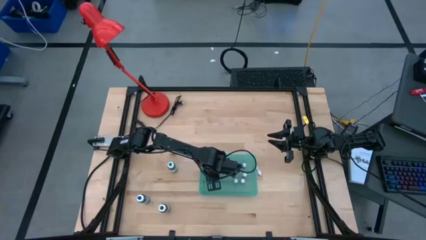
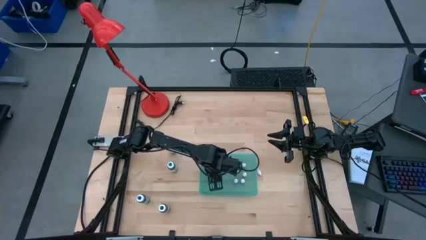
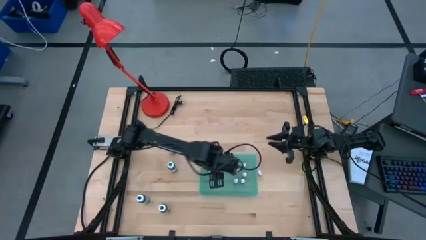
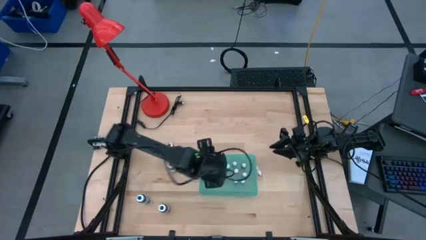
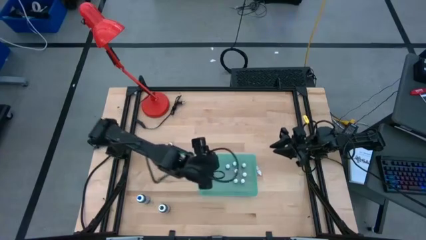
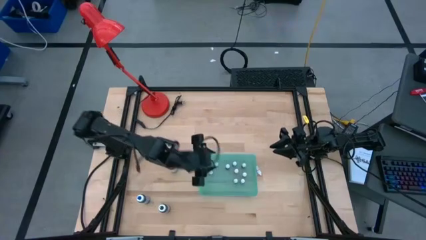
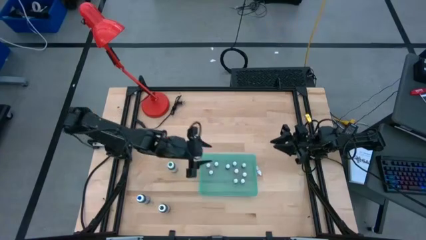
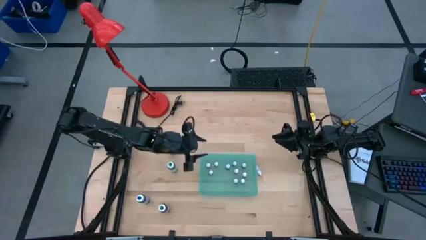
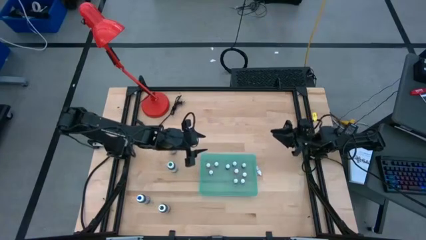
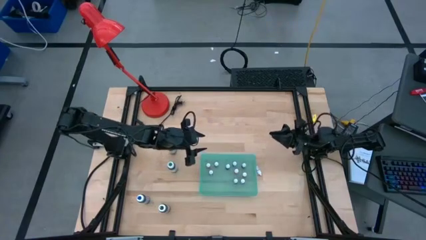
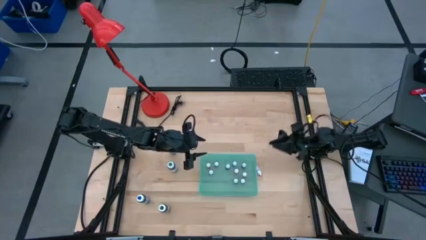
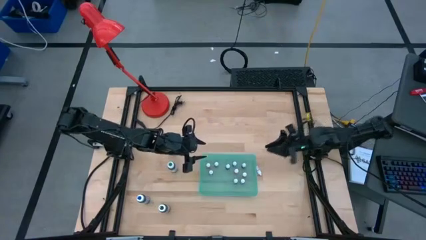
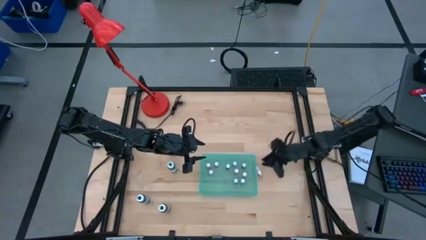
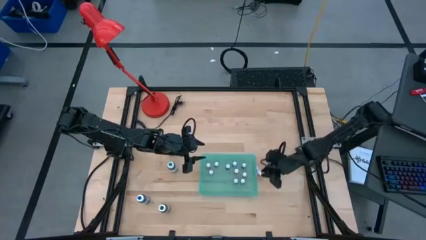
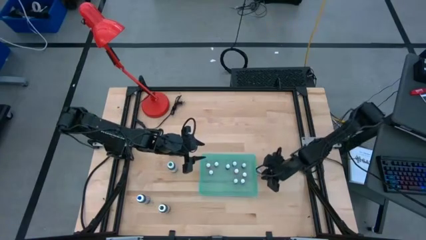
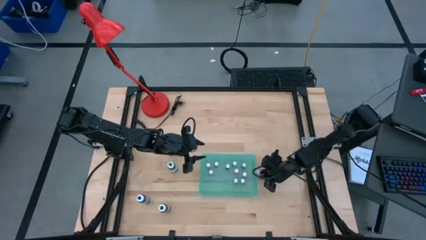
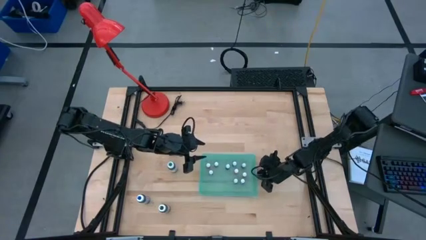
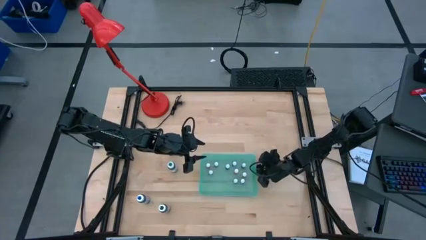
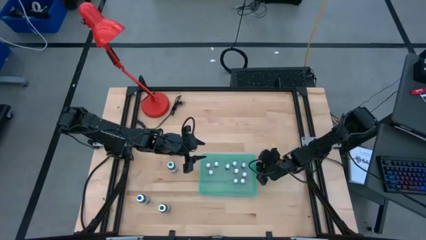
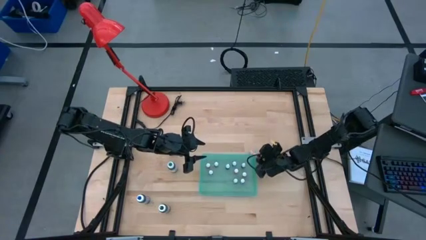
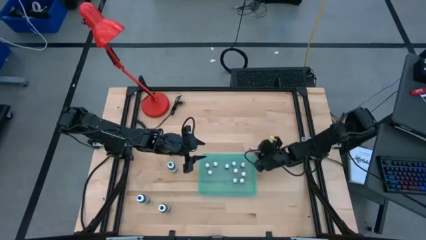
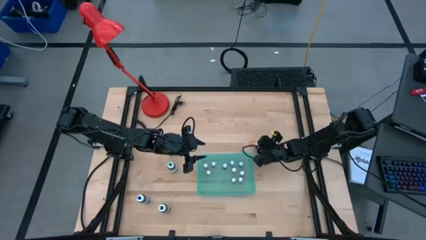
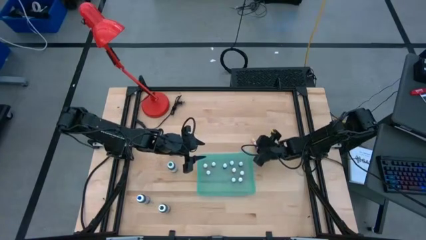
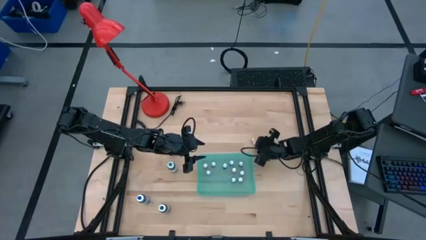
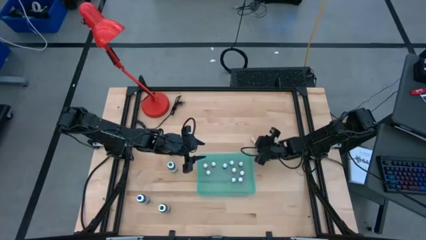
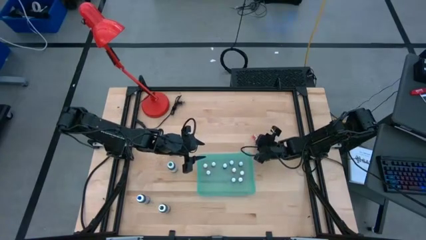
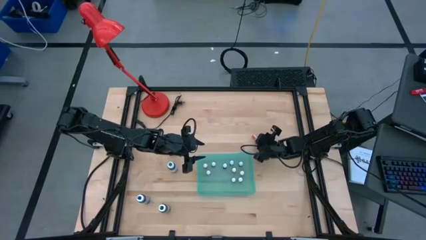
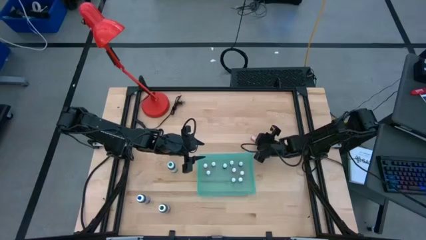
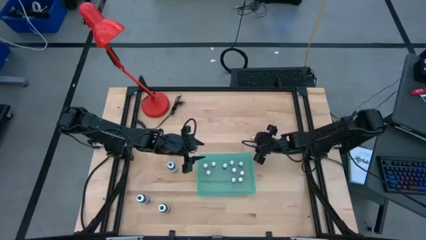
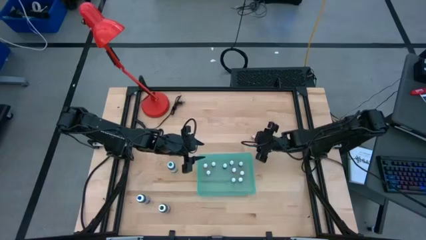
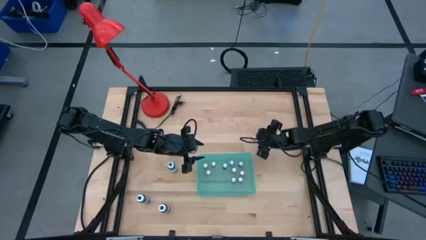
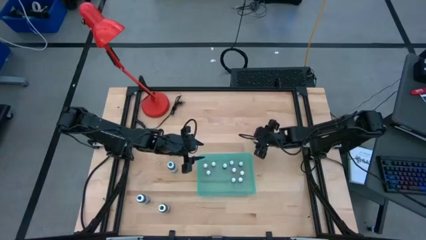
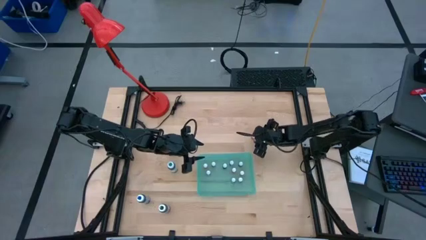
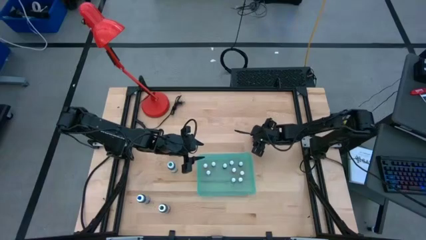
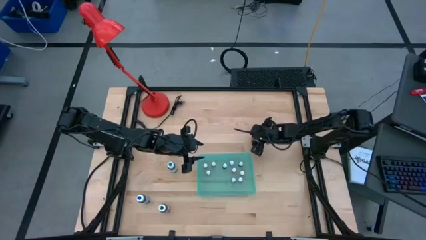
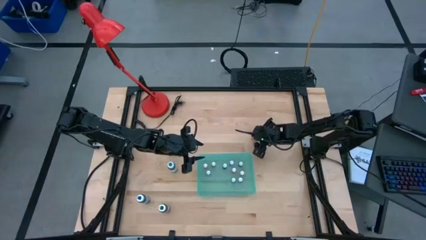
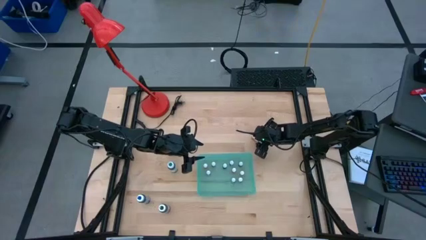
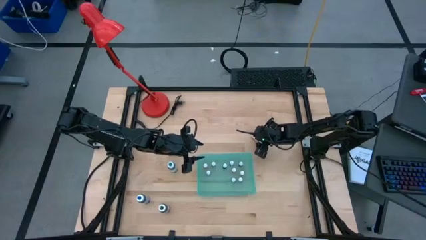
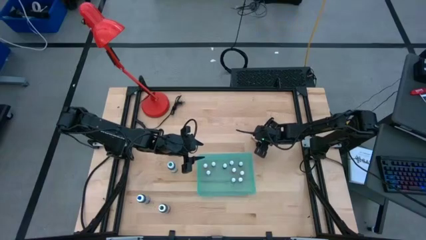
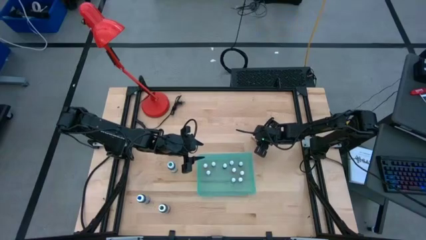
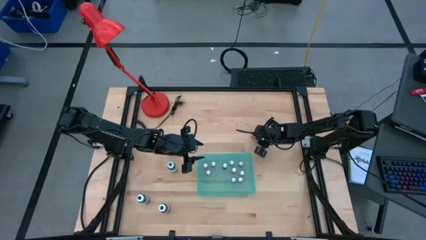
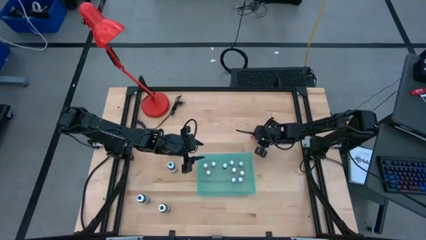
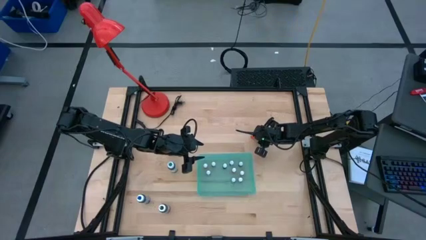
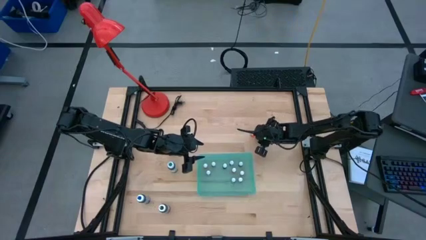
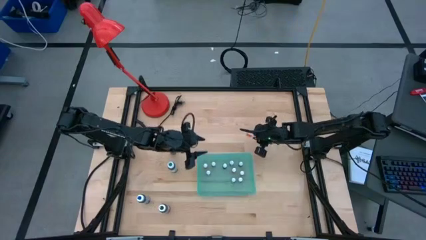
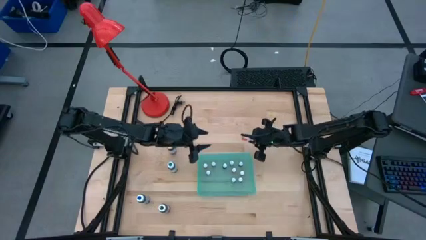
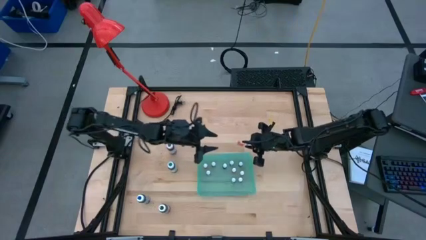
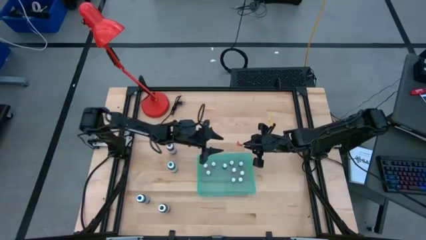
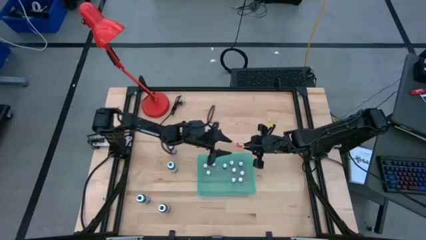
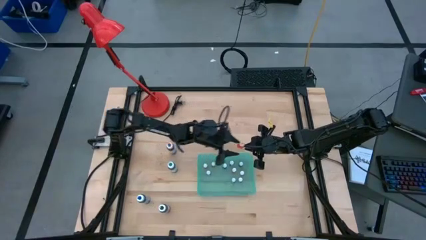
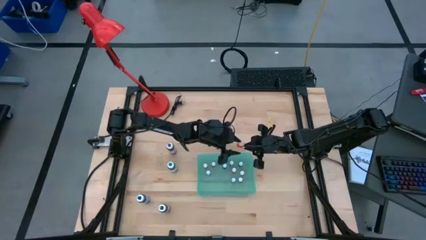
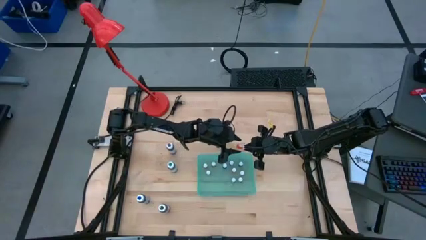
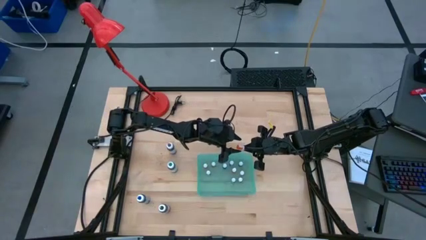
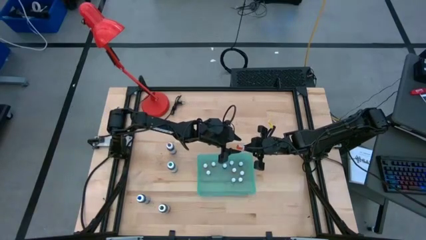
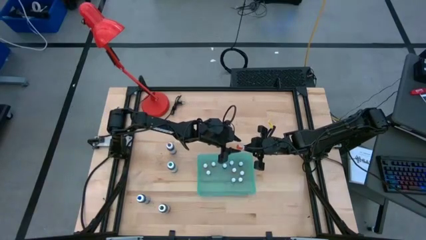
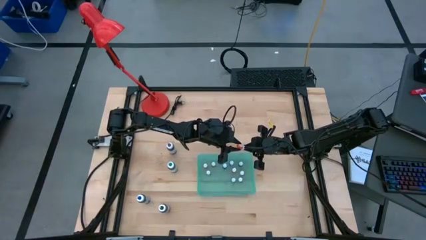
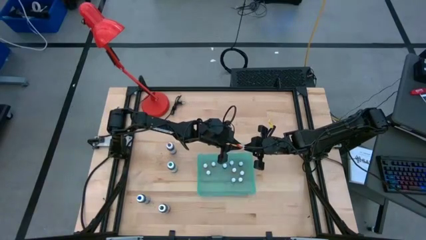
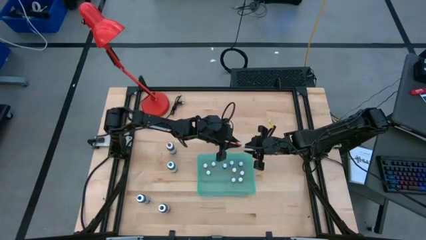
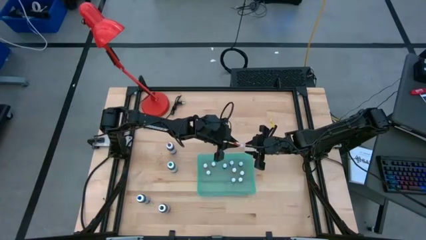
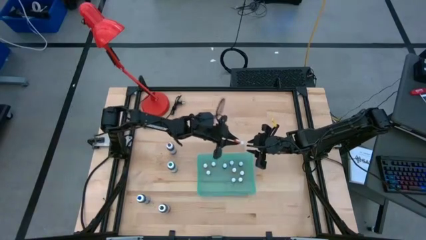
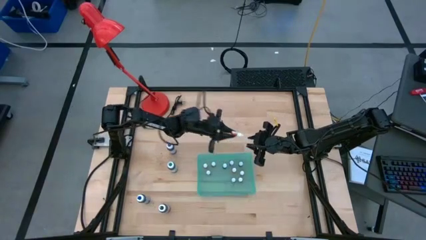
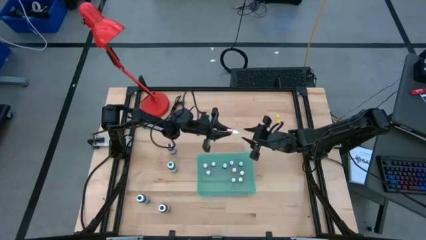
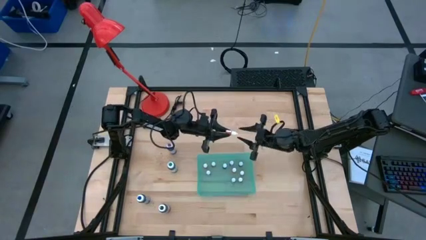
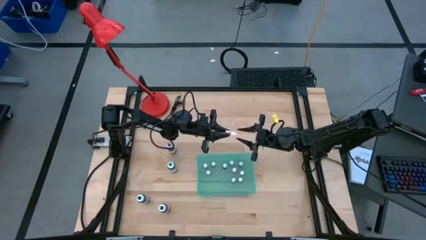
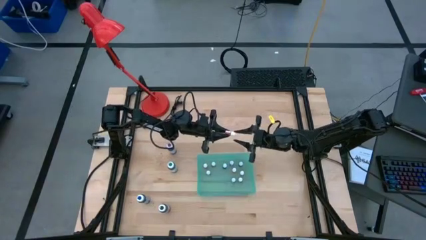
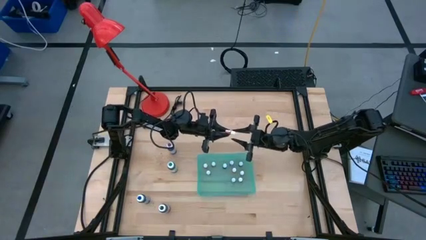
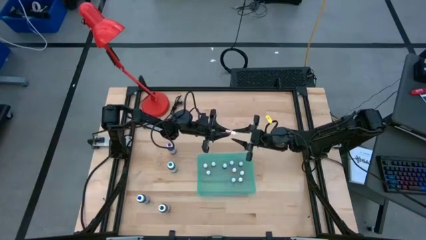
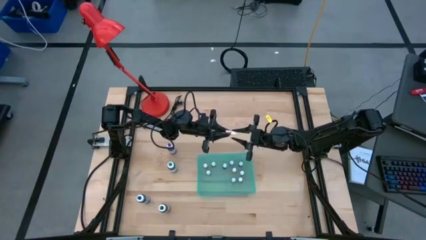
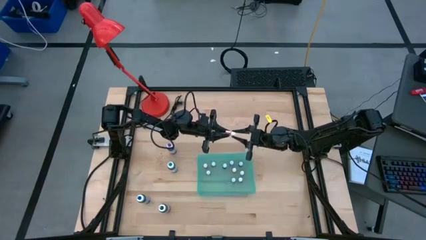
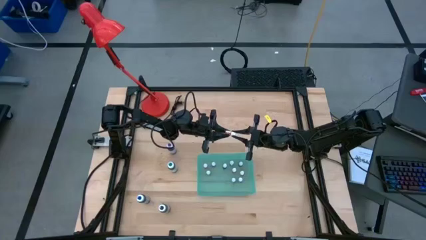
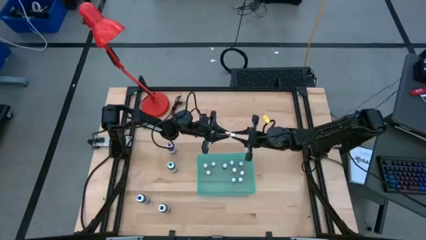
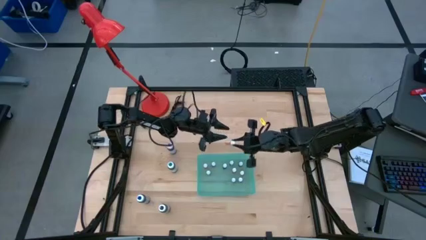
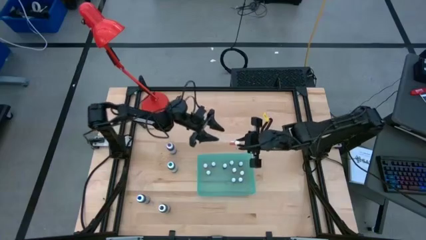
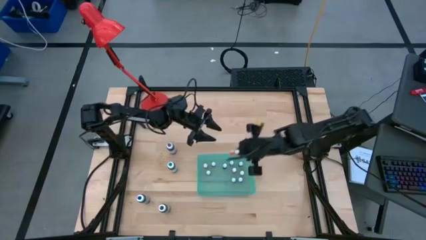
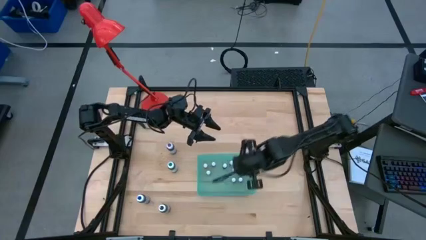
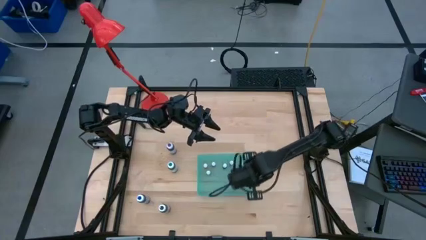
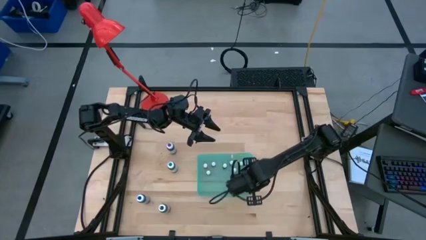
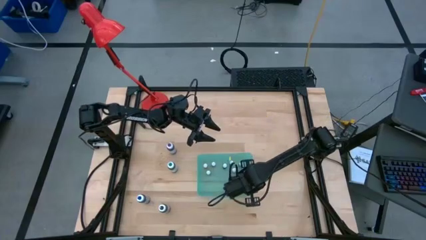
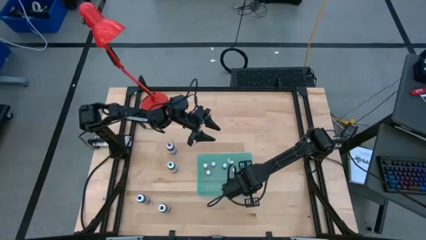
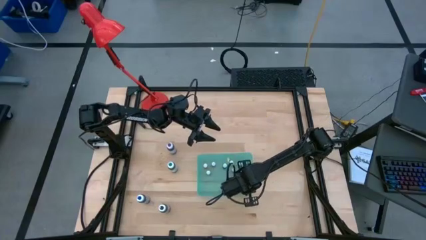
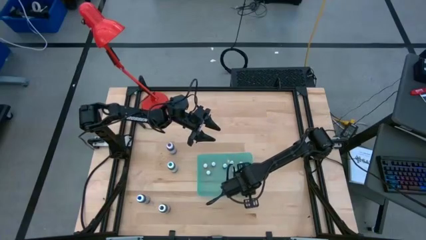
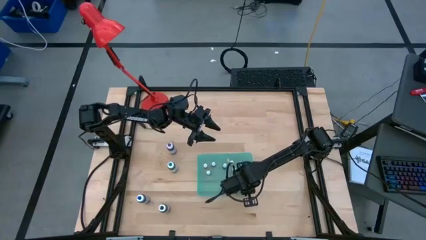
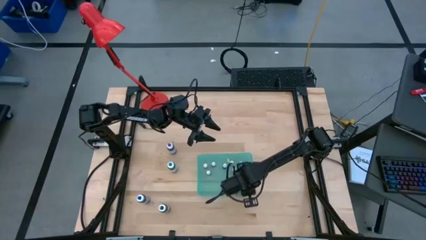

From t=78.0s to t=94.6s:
Task: Pick & Place food coloring
Put the small orange food coloring bottle into the green bin
